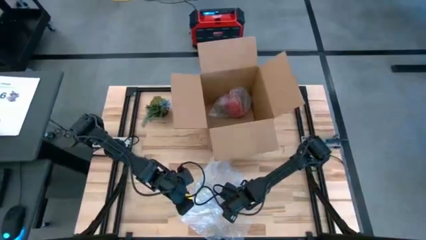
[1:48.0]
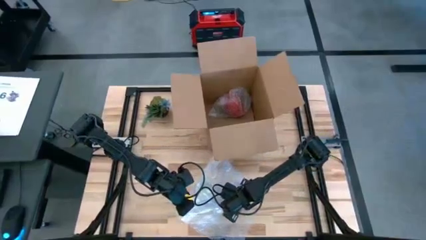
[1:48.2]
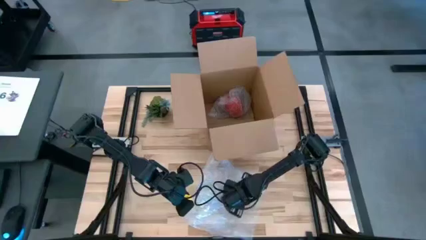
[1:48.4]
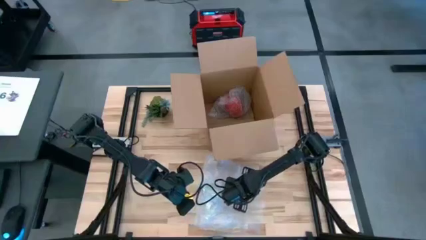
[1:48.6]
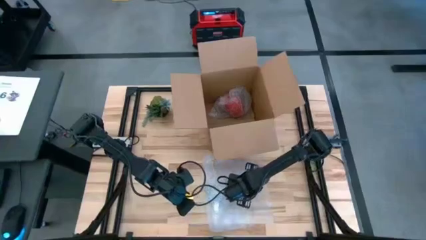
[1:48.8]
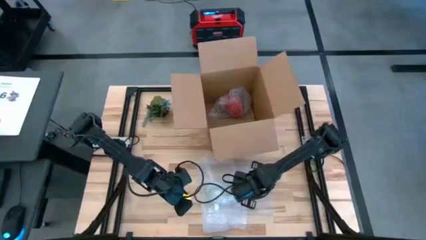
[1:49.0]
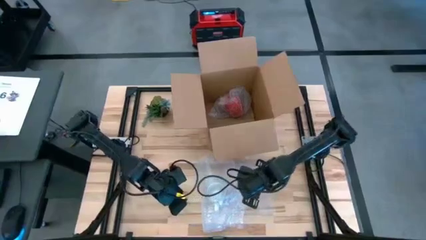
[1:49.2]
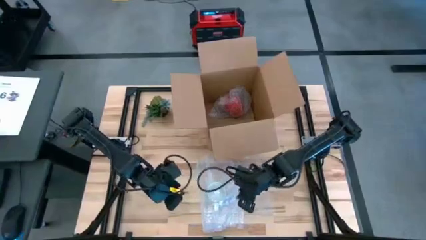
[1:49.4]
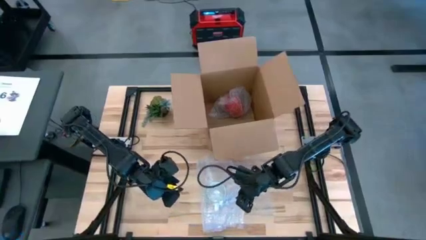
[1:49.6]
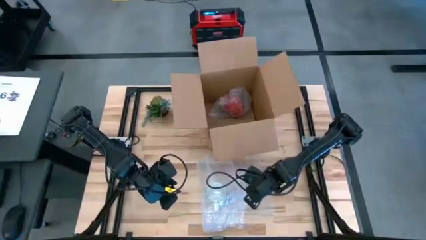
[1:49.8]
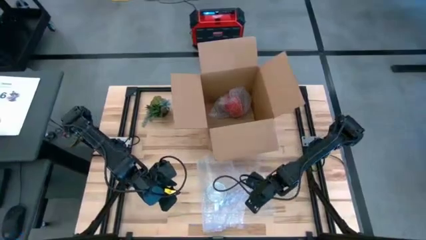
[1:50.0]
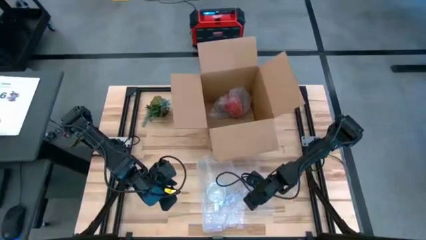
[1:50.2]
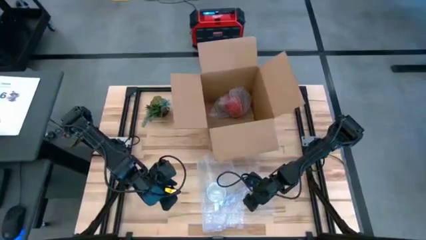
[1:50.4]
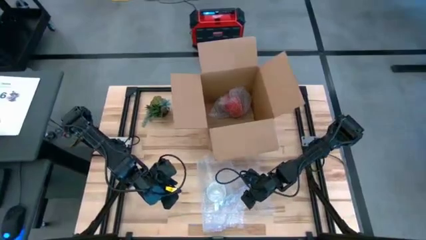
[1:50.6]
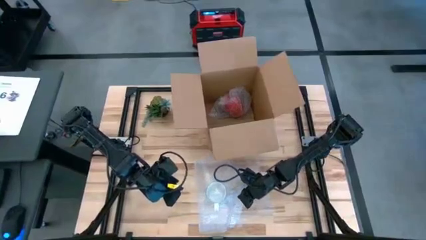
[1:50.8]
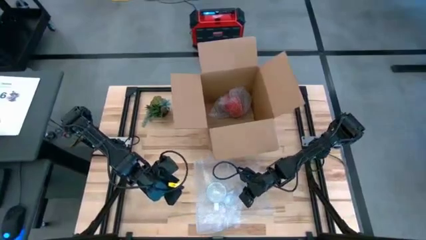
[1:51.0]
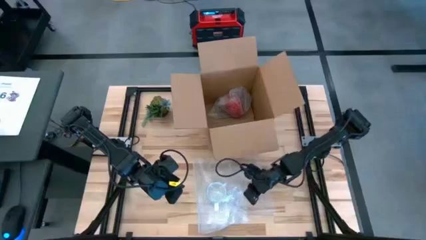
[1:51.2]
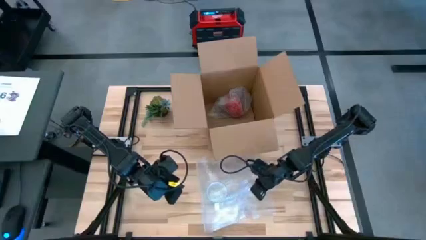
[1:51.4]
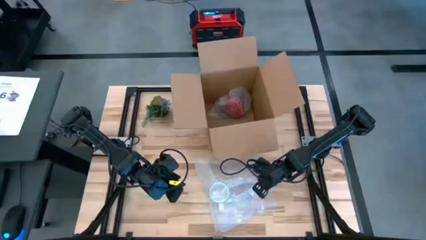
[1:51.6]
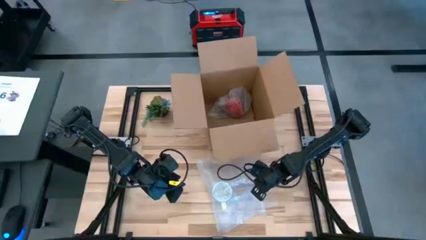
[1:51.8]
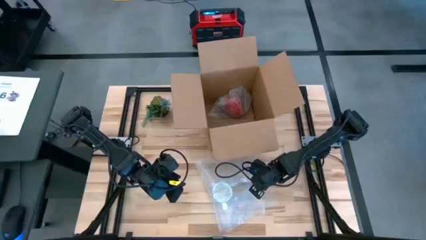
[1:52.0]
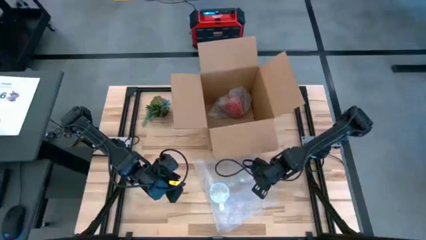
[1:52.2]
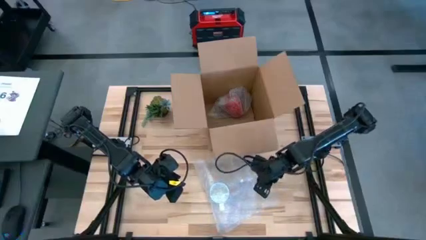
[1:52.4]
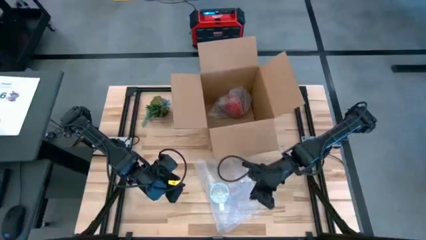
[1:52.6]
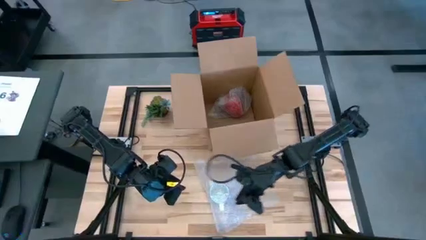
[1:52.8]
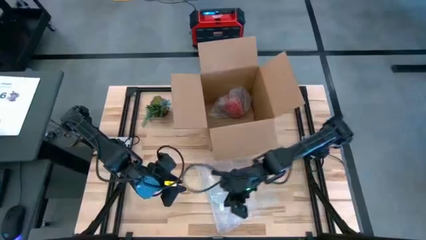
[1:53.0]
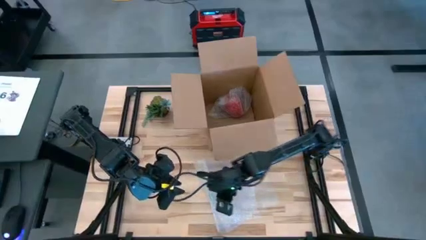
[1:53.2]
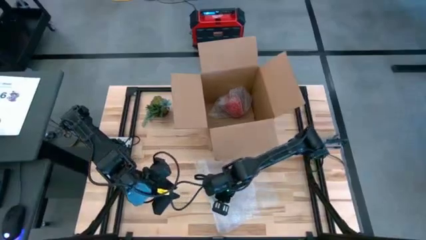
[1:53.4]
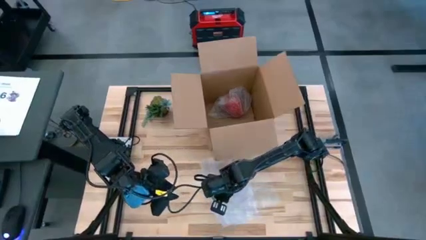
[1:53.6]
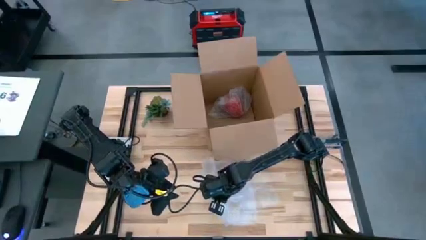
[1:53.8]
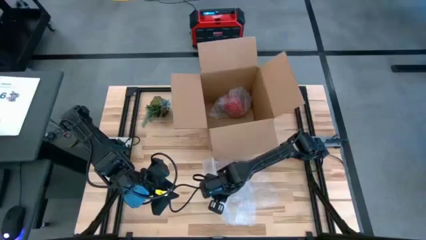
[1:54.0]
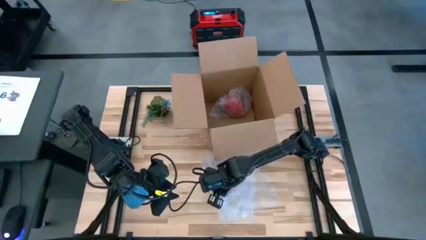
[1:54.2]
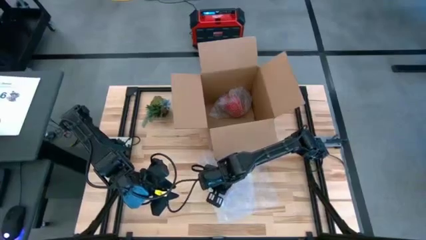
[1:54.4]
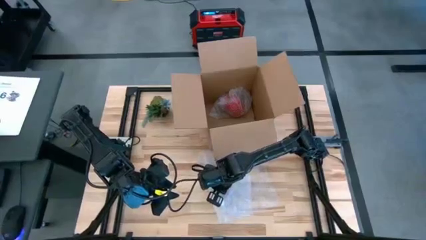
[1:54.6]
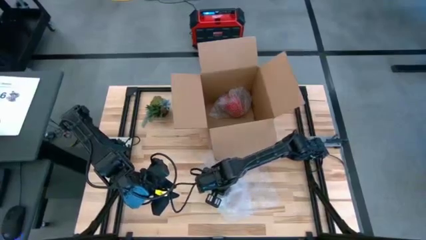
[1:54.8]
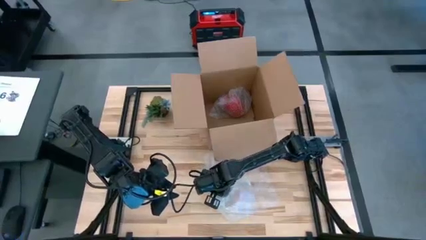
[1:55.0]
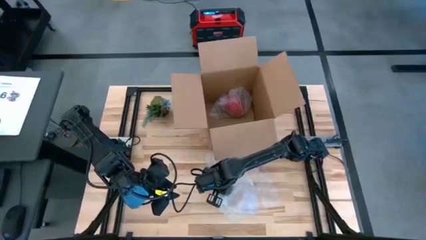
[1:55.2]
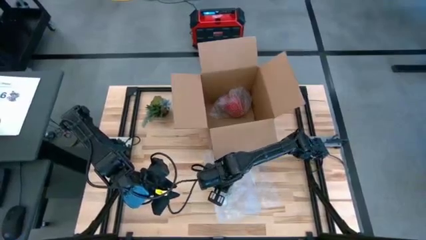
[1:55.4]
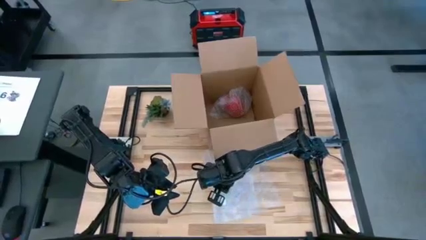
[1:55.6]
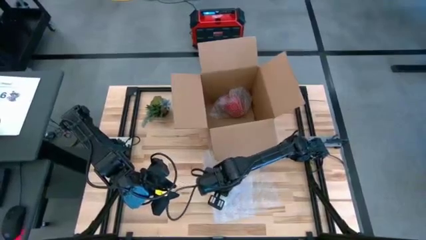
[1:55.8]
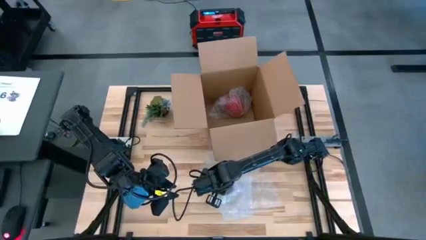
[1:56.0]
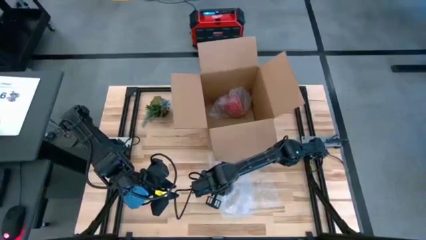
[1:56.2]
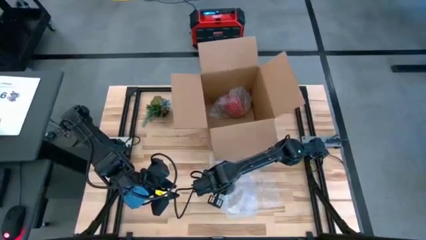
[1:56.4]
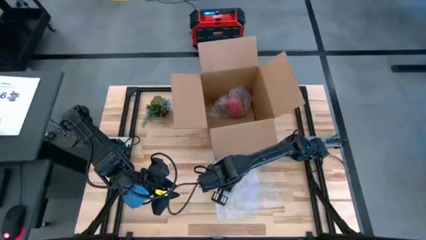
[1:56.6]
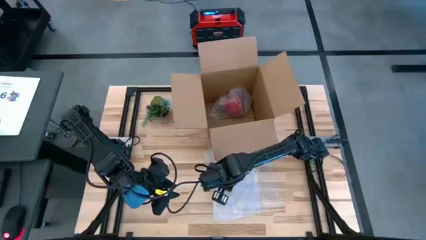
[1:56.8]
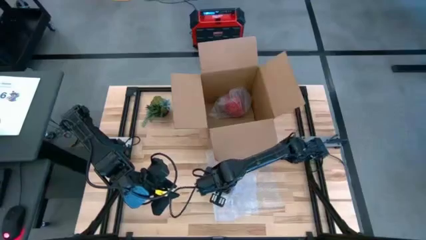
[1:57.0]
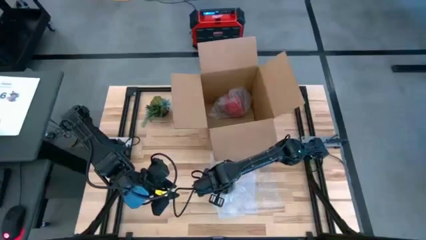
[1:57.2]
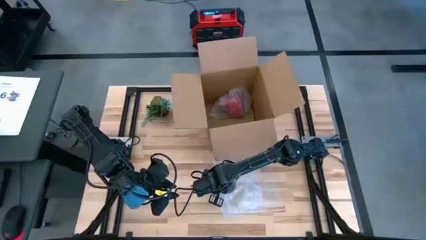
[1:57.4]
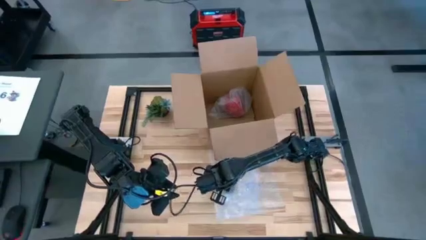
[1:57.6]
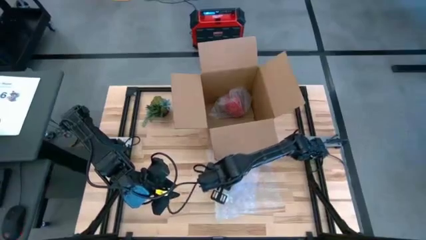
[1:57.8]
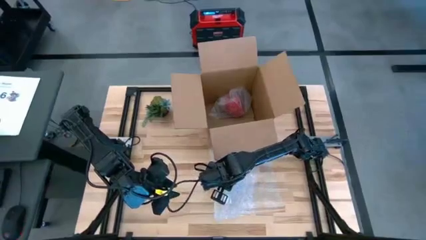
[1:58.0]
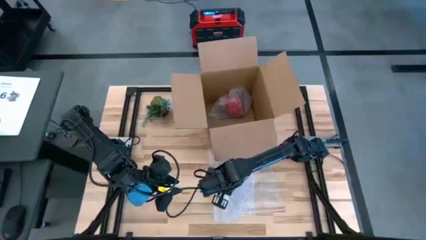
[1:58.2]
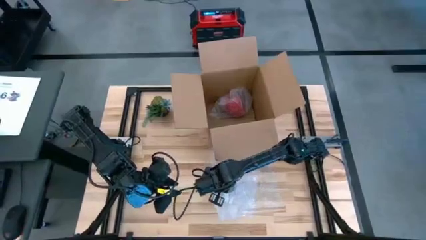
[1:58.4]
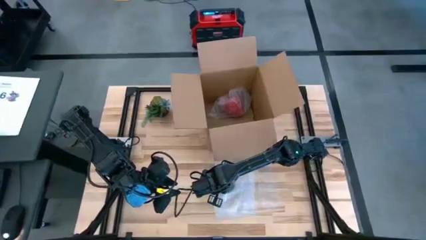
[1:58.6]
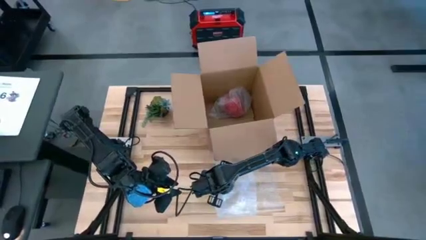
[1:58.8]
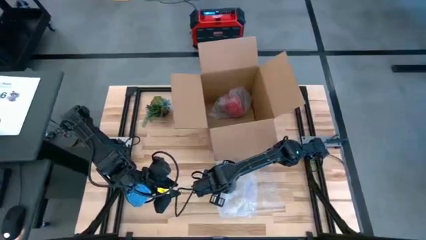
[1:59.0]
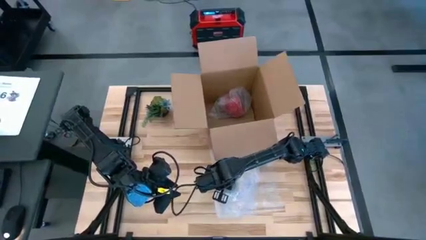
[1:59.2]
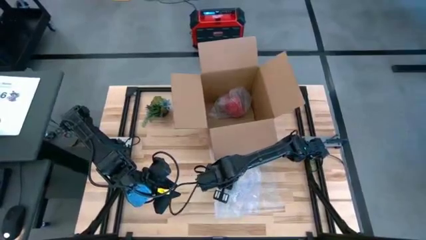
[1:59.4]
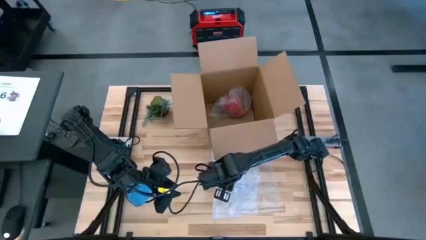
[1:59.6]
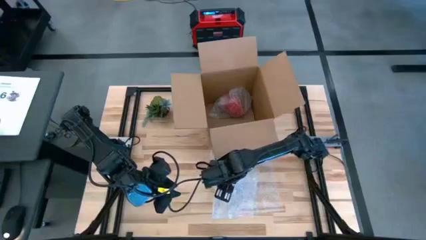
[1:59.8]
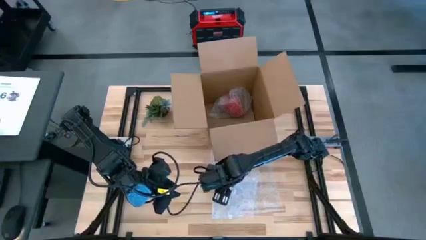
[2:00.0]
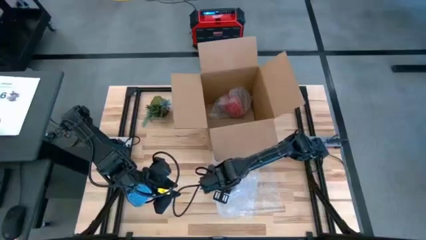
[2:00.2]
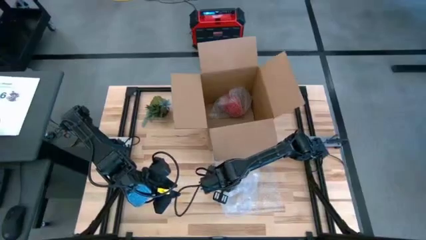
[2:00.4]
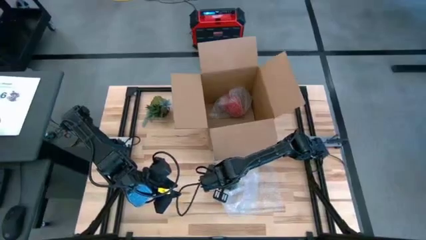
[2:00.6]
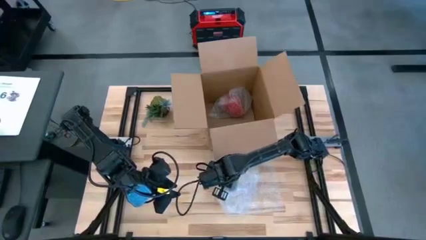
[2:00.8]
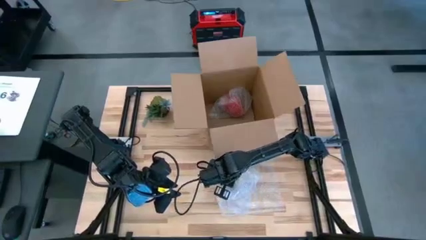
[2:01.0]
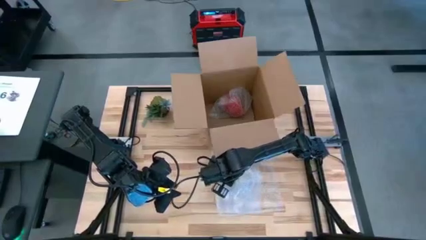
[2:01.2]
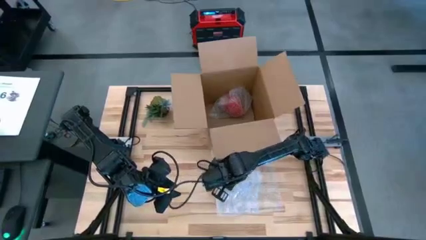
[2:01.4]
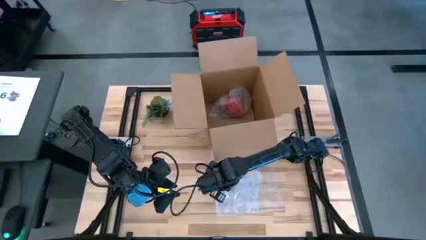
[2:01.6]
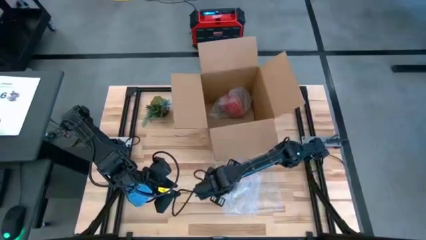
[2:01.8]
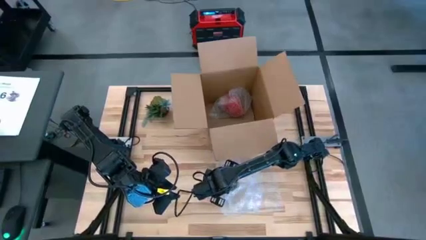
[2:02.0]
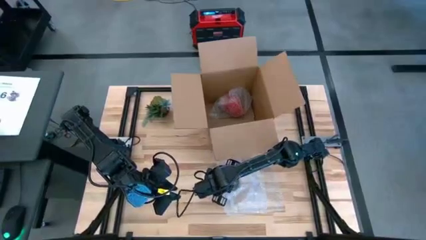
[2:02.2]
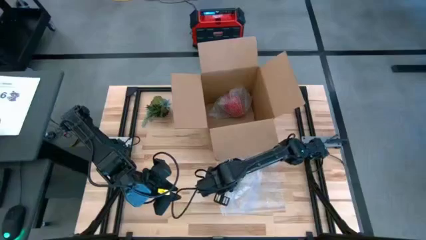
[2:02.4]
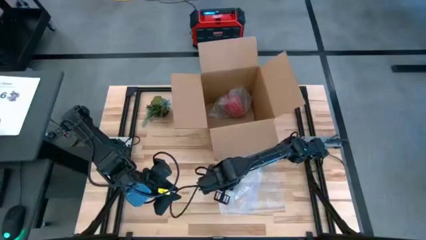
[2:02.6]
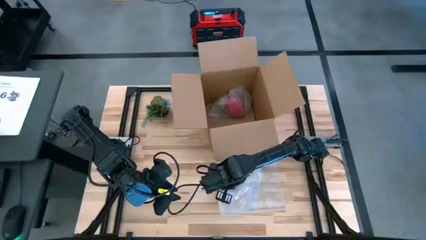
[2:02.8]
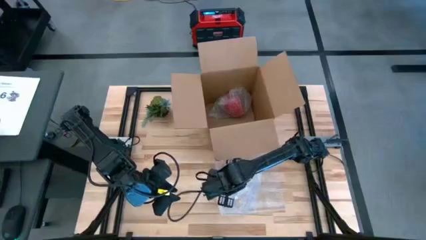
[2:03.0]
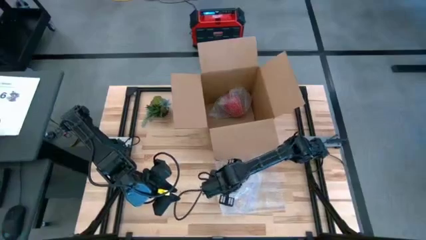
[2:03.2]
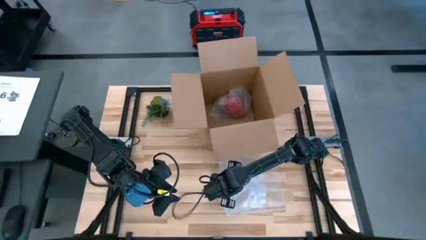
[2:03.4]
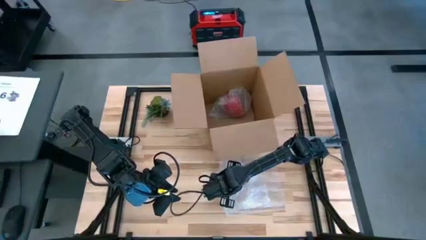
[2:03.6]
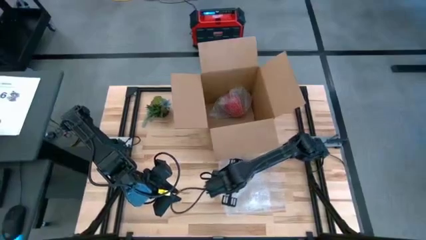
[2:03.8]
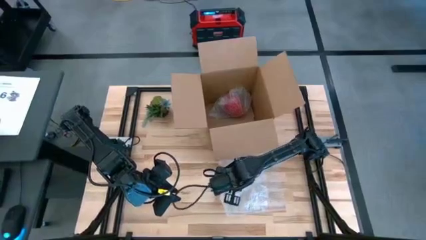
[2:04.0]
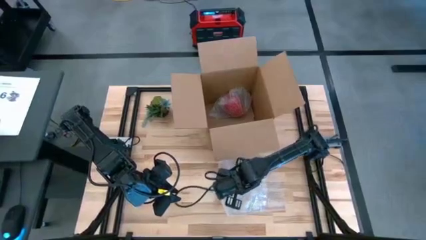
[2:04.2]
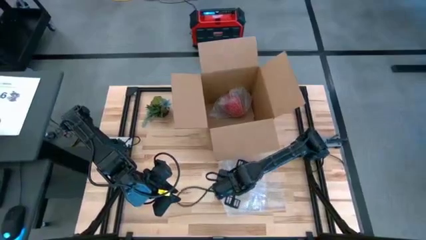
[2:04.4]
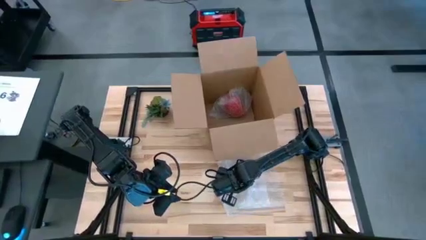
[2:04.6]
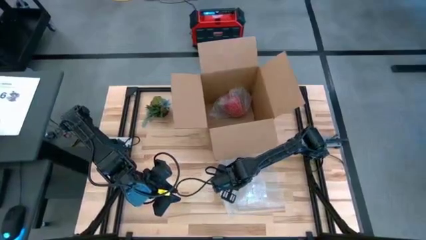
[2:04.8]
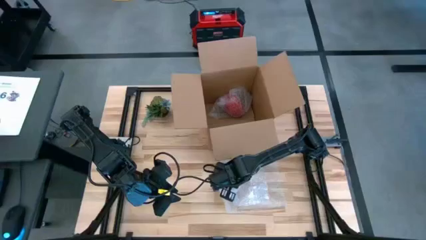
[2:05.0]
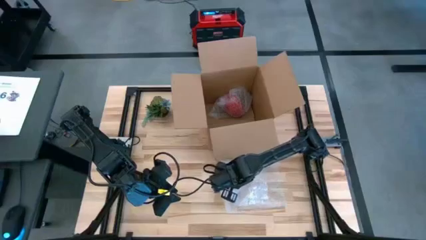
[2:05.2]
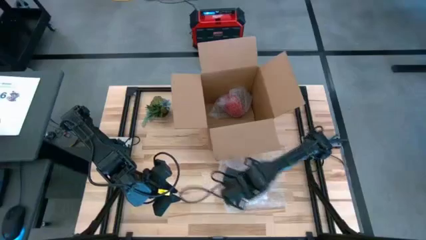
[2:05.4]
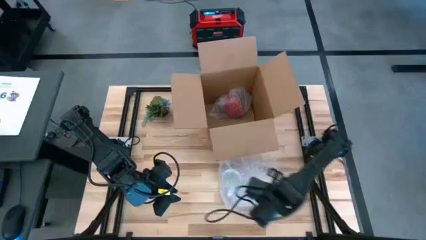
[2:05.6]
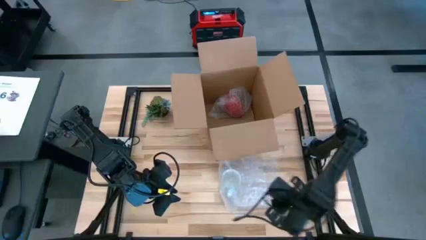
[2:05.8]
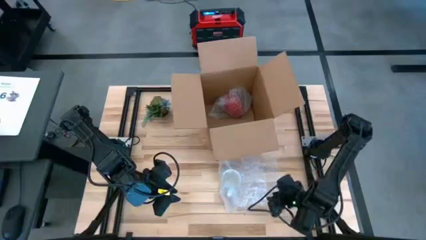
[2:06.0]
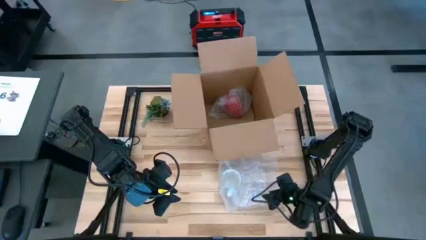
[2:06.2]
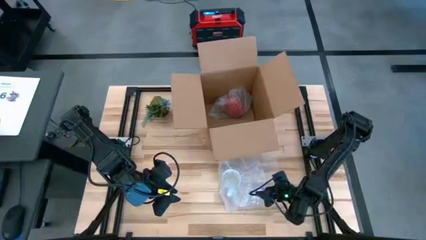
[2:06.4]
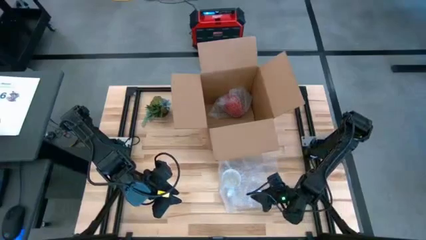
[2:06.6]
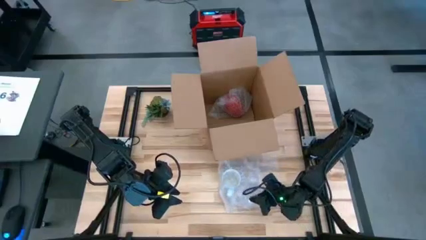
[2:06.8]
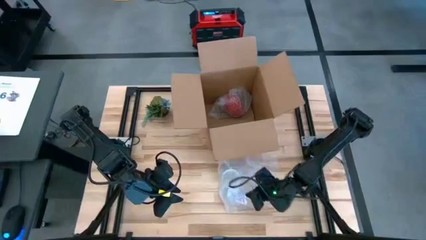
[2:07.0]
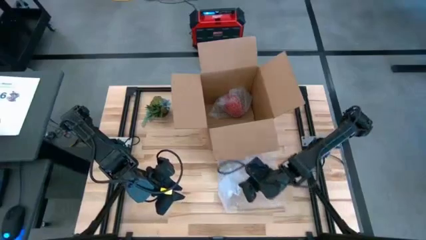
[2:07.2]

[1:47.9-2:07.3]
Task: wrap mug
Wrap the white mug with bubble wrap
